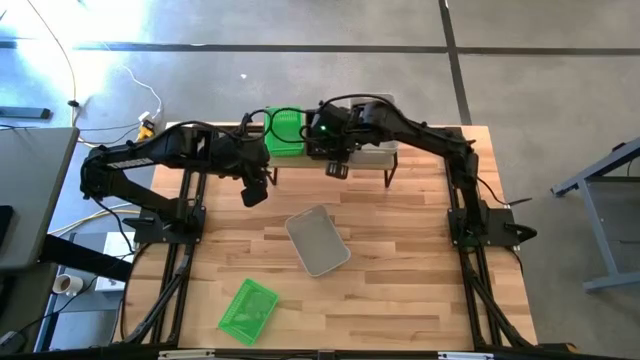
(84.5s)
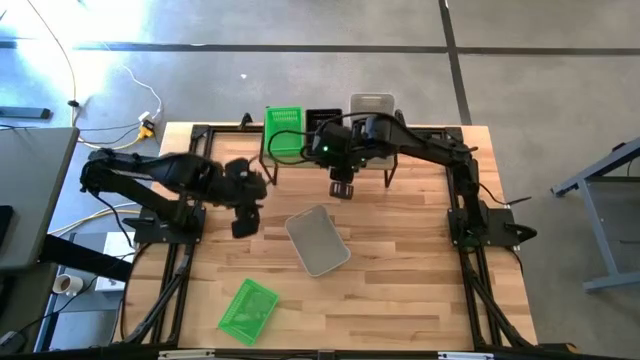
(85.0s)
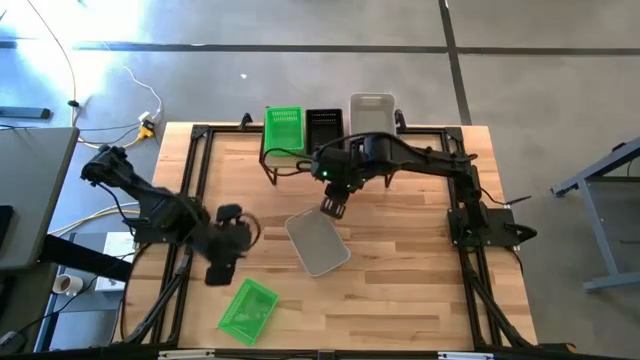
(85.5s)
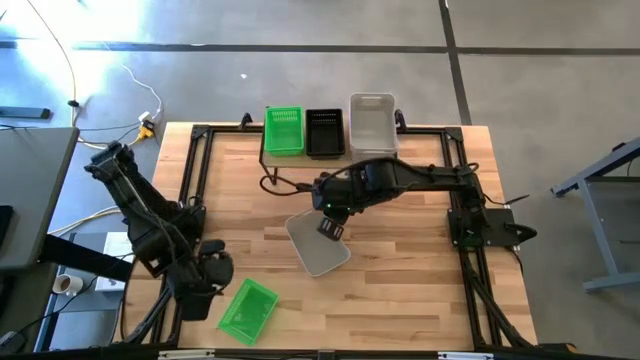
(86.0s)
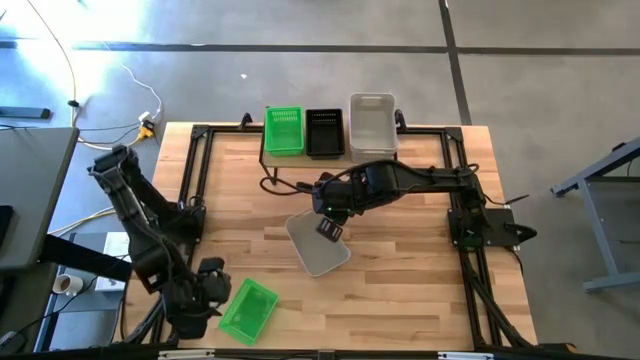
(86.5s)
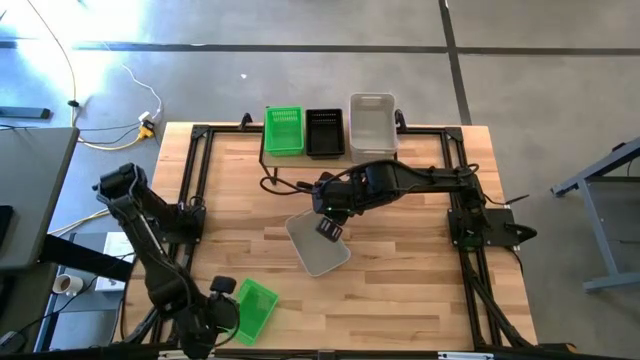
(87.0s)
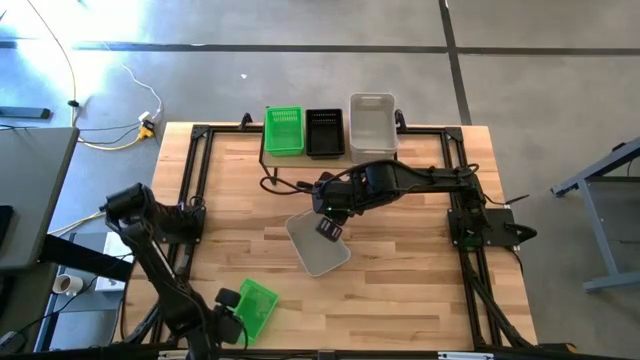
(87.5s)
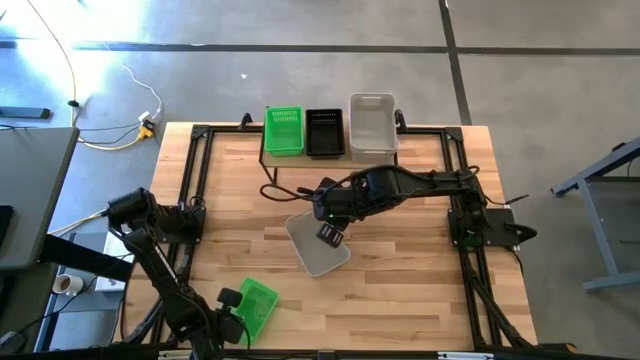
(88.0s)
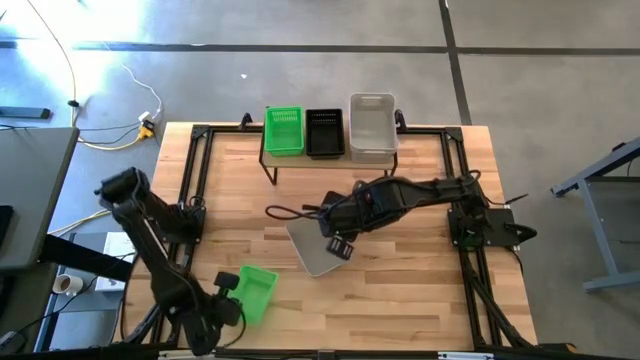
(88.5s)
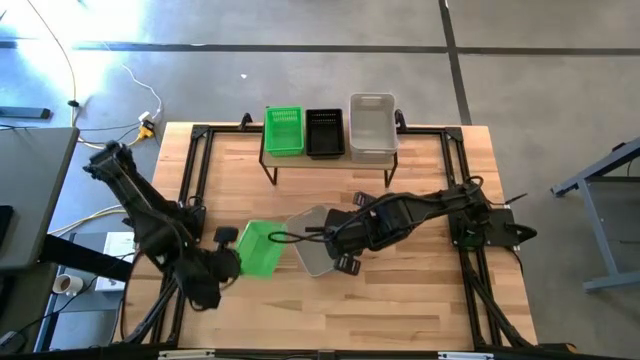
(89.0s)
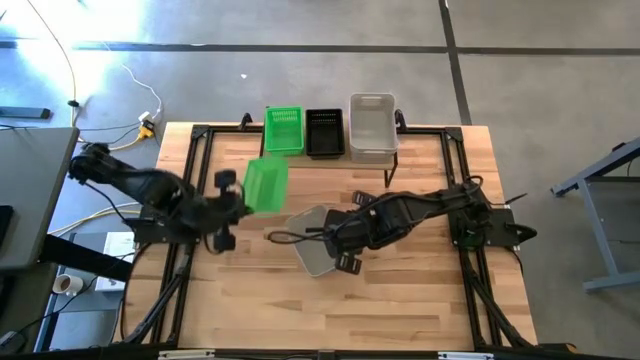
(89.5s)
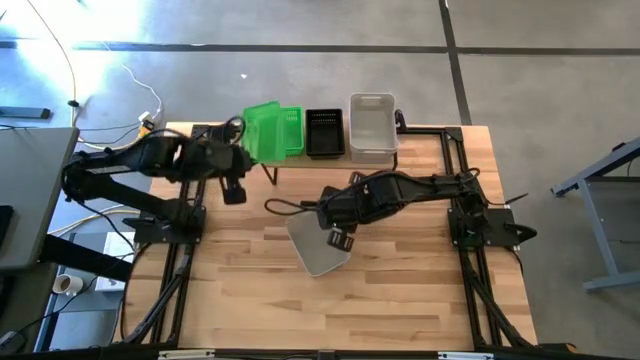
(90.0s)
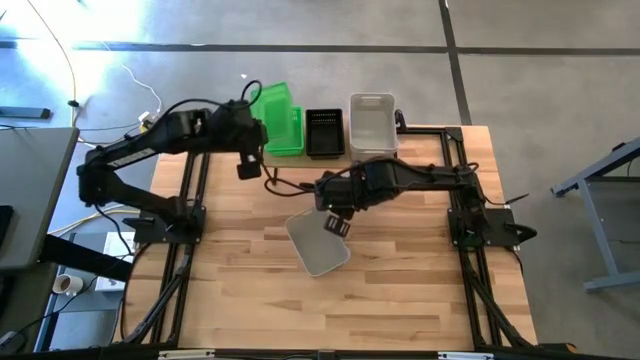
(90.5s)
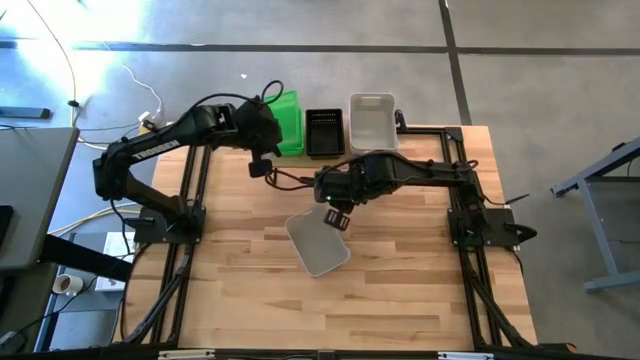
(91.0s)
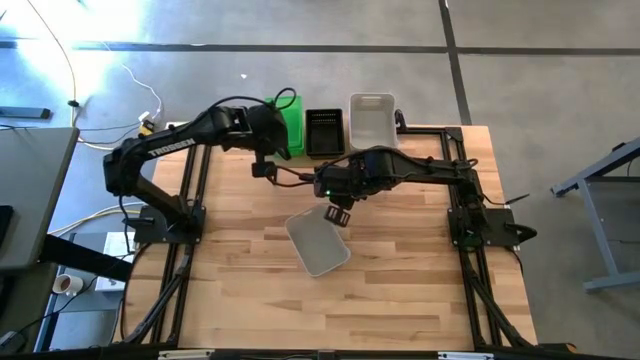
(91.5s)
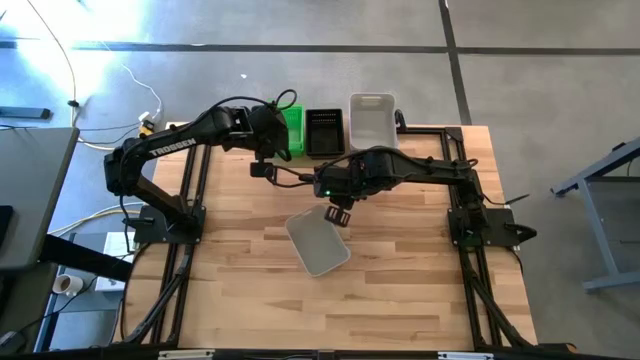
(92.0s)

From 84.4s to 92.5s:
Task: Stack baskets on shelf by color
Stack the green bin on top of the green bins on the shelf

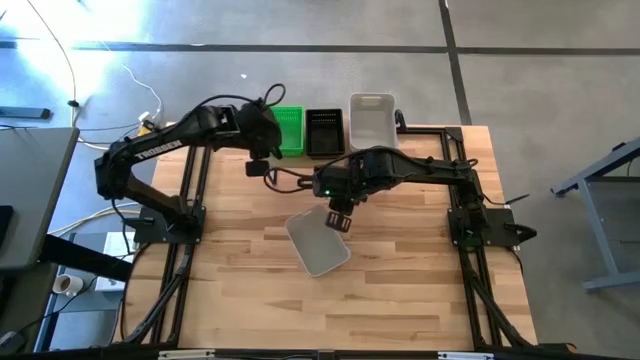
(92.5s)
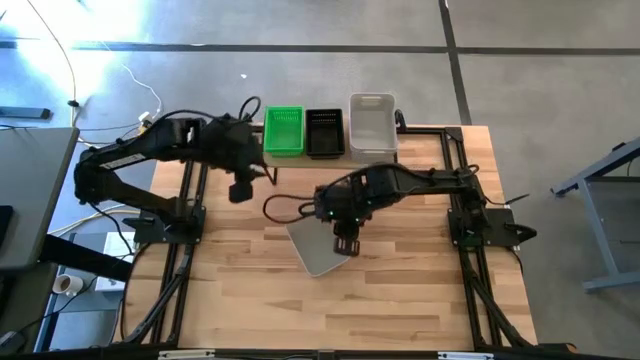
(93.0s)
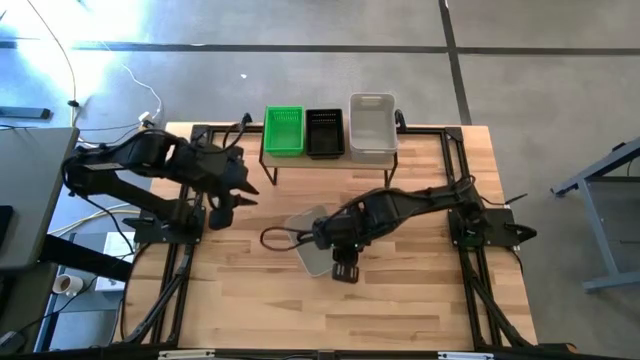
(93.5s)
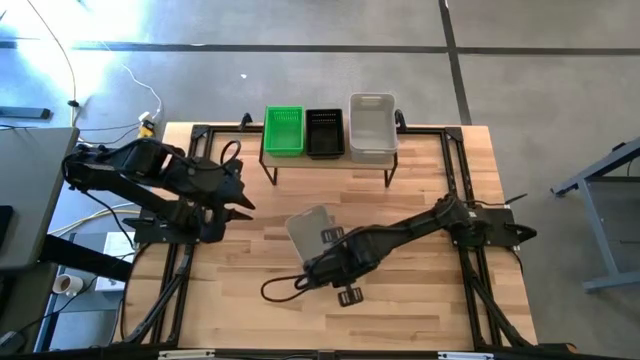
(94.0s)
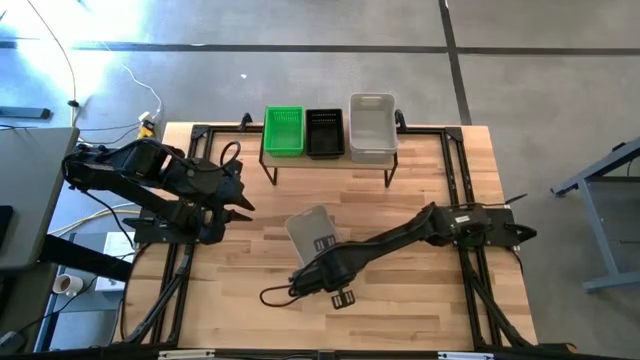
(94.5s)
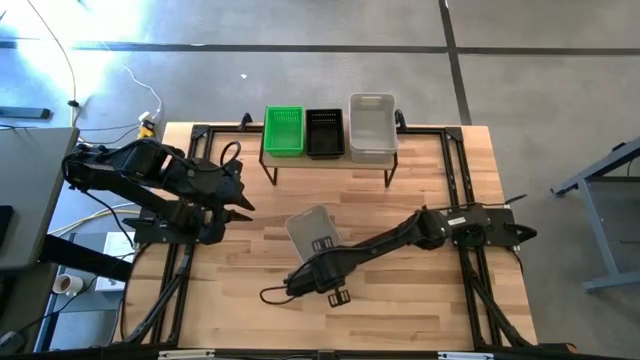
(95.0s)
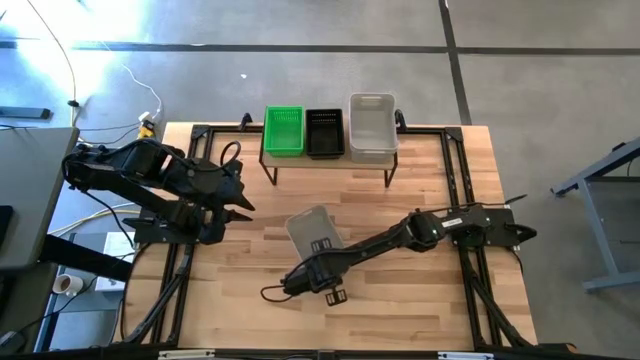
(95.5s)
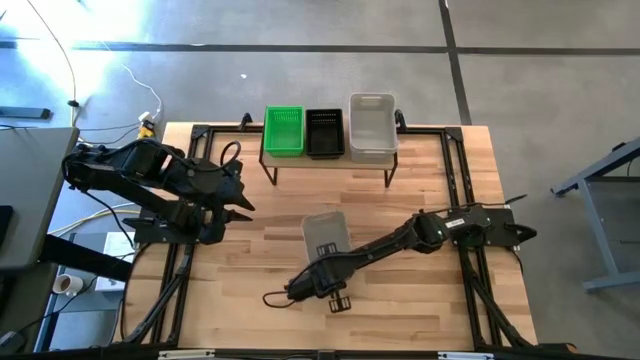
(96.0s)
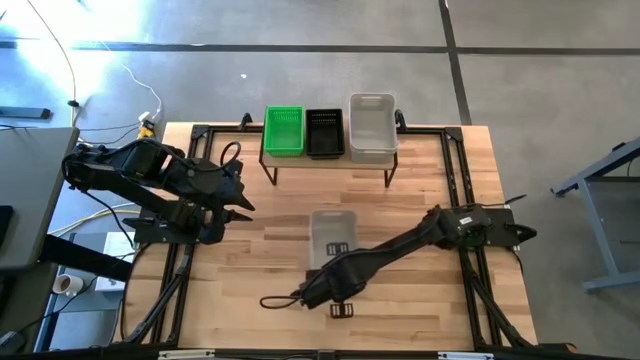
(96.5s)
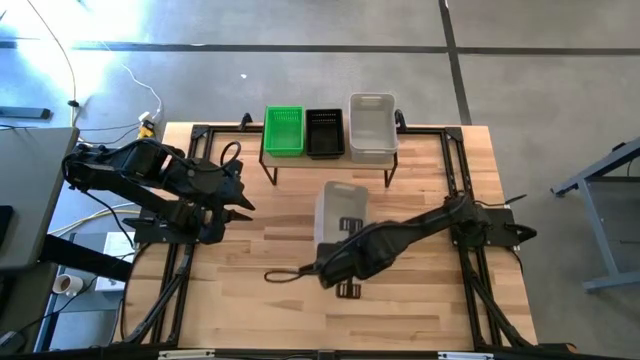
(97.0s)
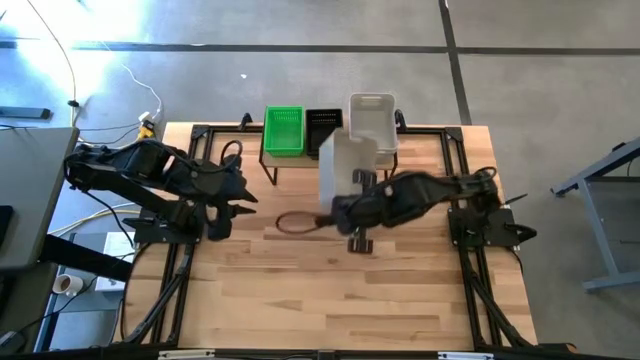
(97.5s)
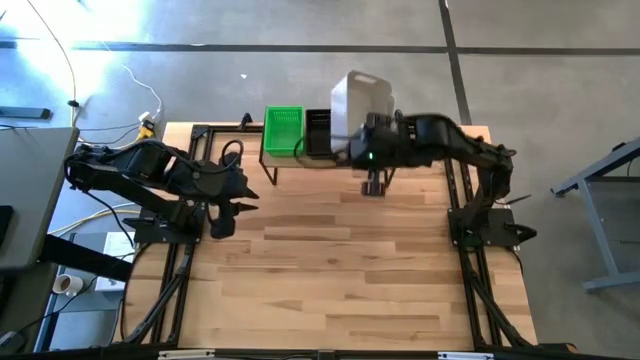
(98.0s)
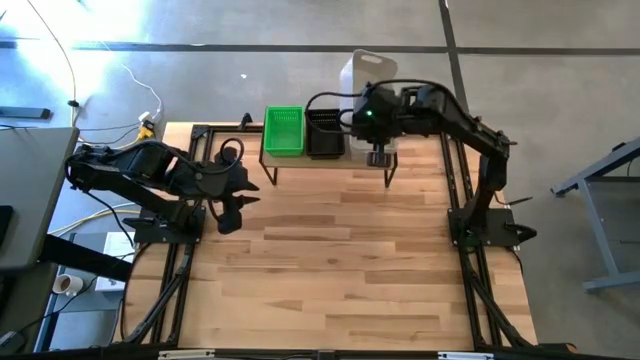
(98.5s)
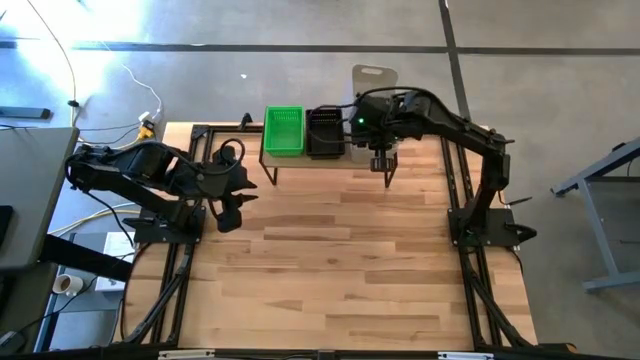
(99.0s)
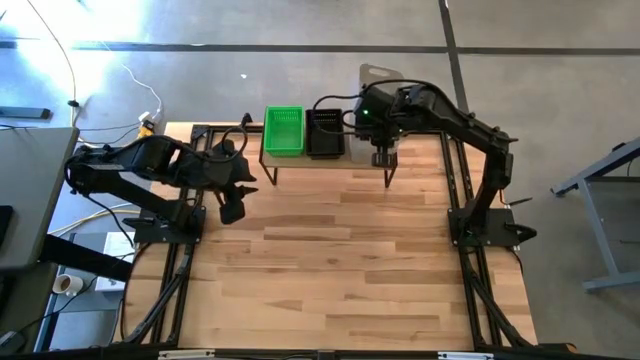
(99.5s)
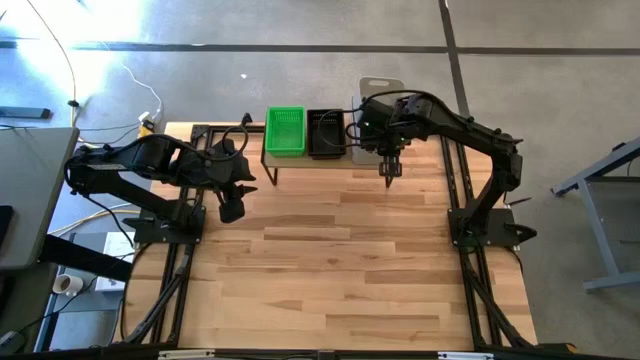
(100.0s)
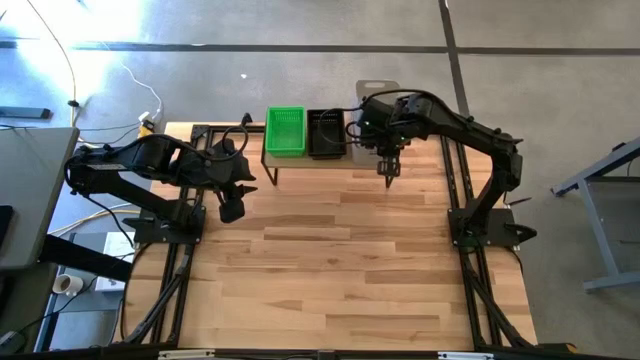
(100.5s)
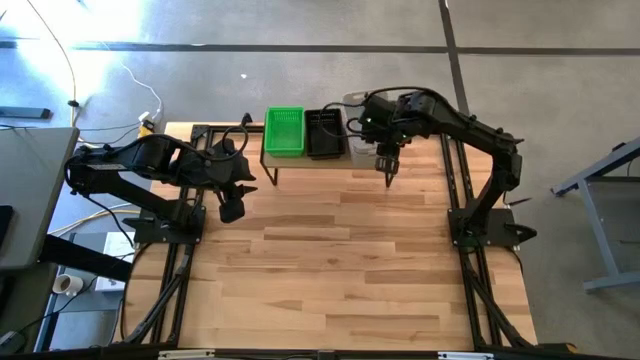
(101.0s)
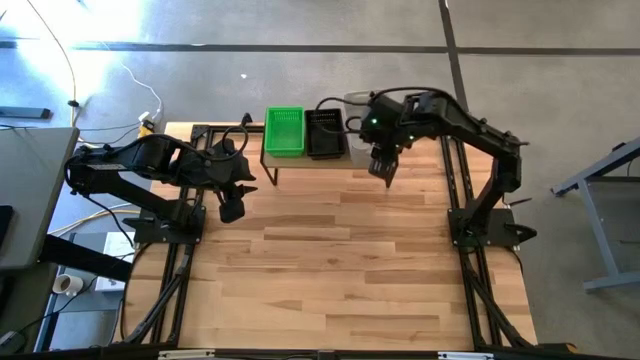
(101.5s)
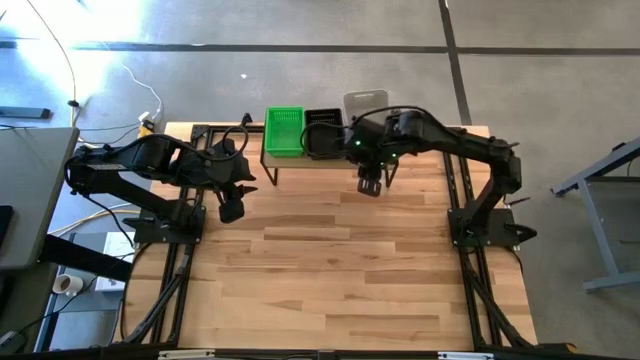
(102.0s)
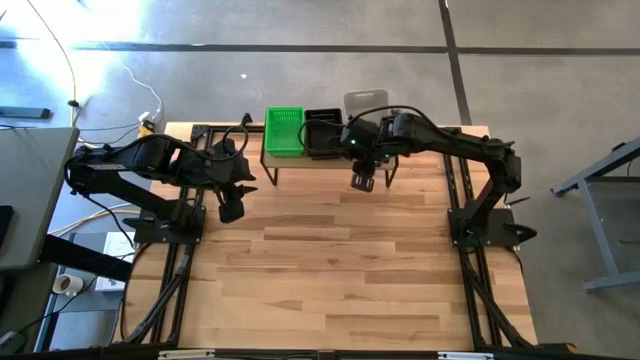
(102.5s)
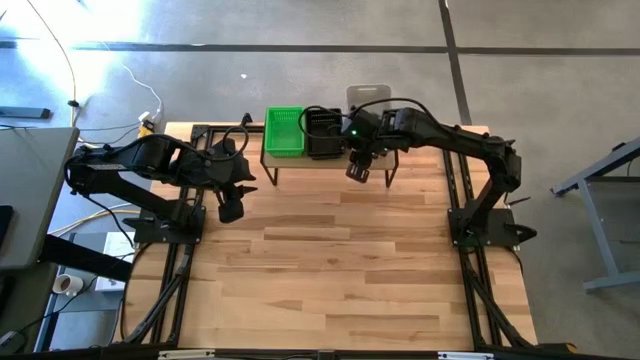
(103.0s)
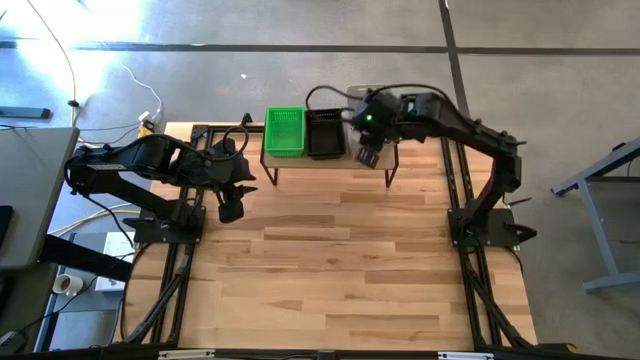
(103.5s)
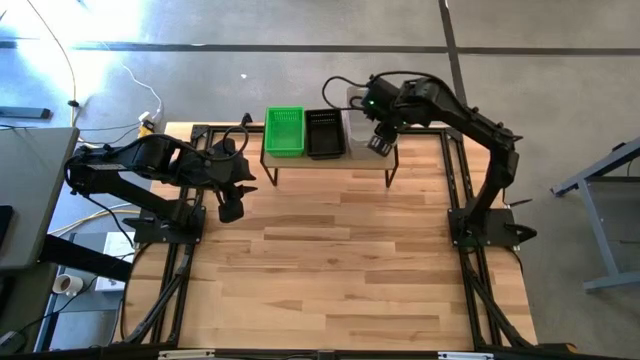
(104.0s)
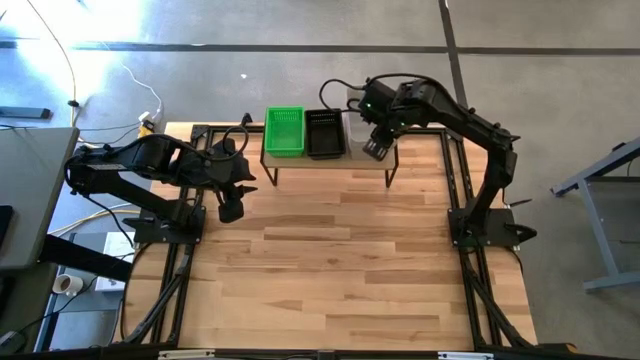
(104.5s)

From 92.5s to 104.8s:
Stack the gray bin on top of the gray bins on the shelf

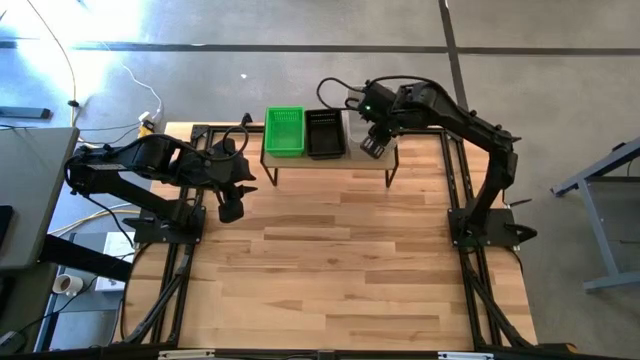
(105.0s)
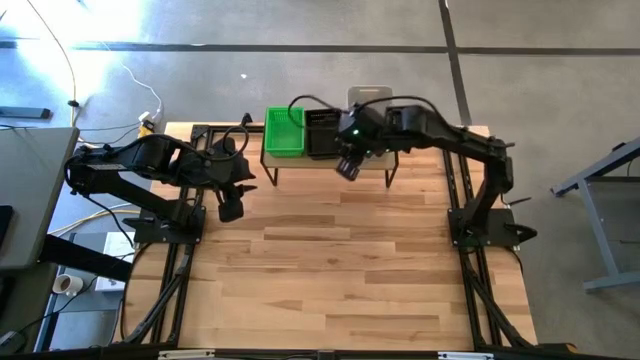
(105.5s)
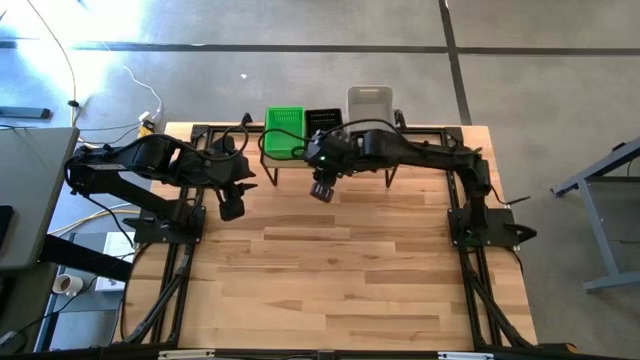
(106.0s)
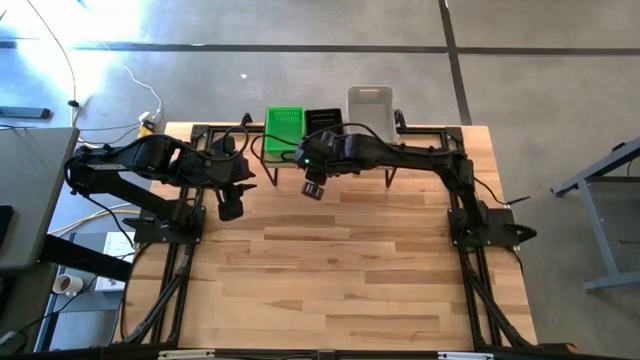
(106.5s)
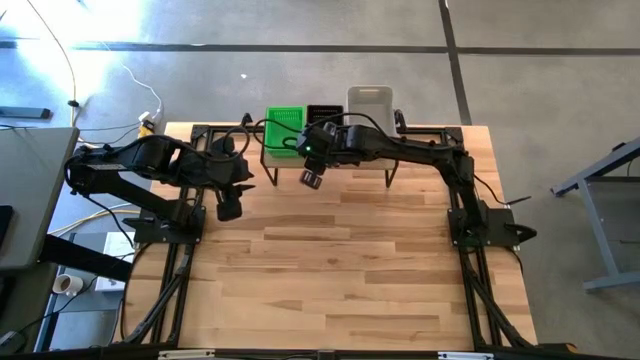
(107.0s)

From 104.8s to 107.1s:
Adjust the stacked black bins on the shelf
